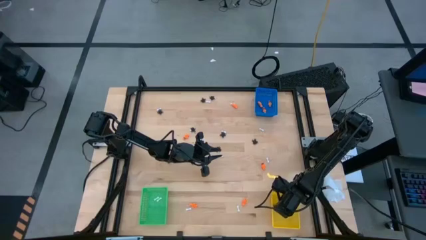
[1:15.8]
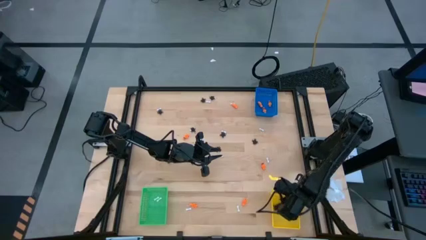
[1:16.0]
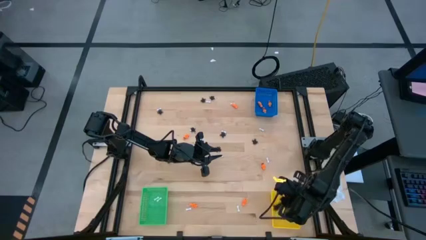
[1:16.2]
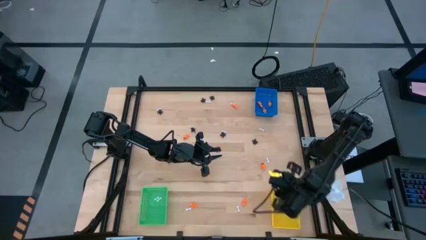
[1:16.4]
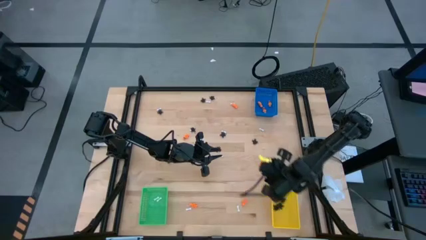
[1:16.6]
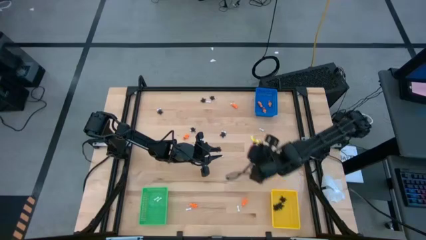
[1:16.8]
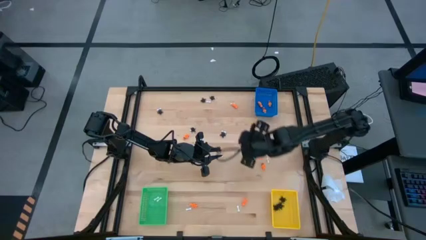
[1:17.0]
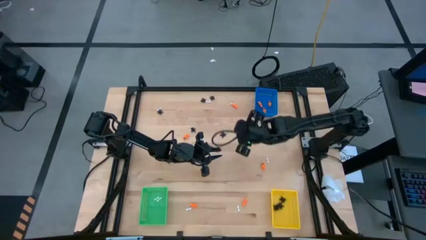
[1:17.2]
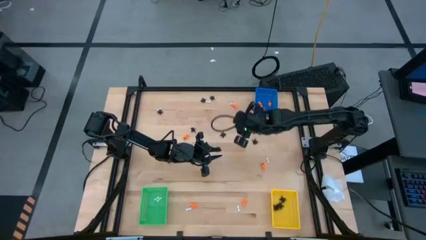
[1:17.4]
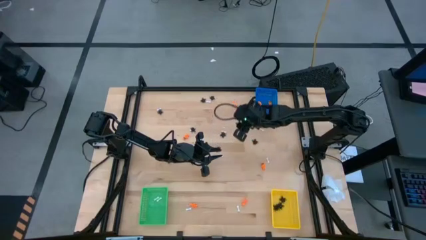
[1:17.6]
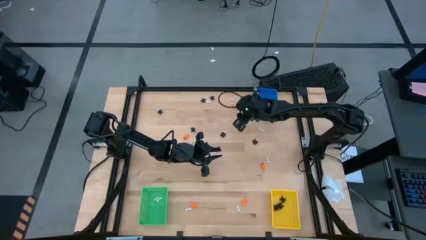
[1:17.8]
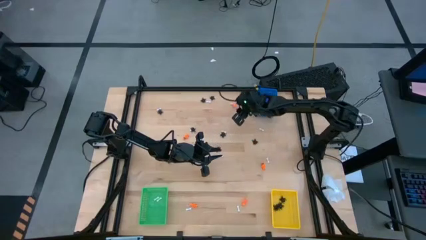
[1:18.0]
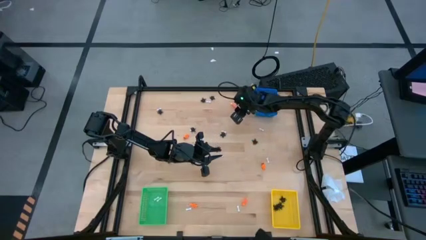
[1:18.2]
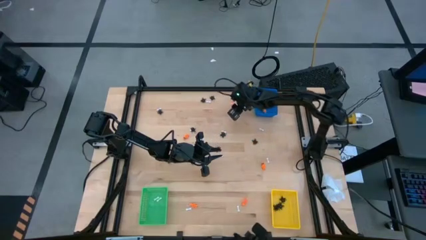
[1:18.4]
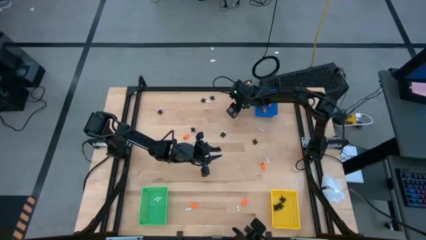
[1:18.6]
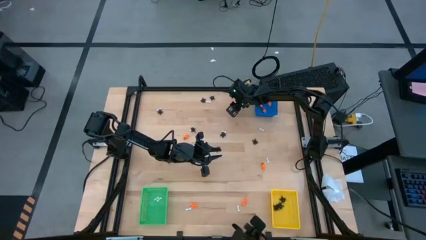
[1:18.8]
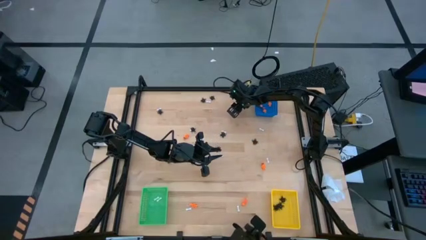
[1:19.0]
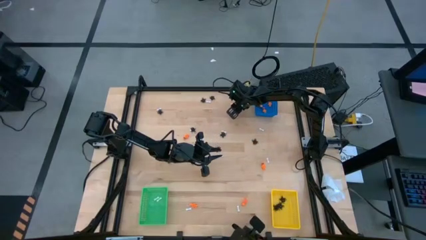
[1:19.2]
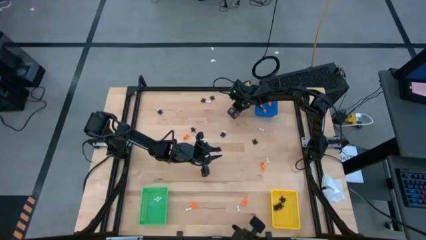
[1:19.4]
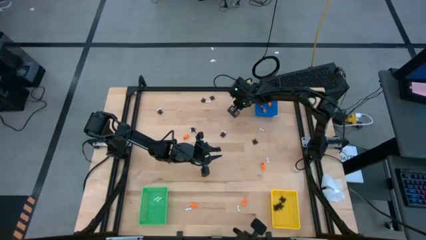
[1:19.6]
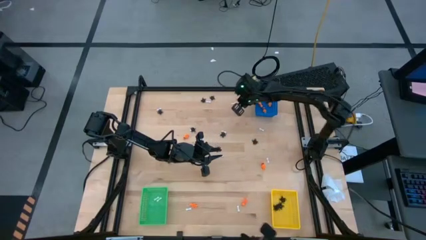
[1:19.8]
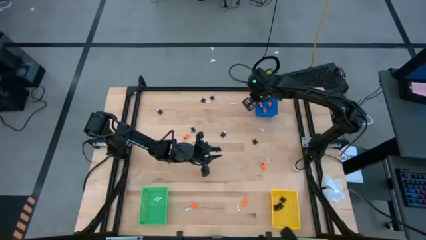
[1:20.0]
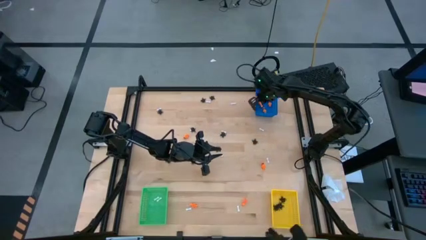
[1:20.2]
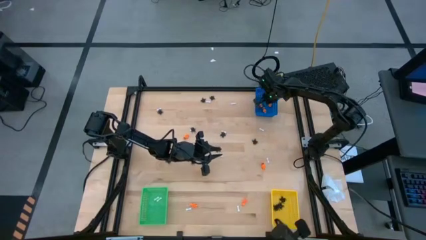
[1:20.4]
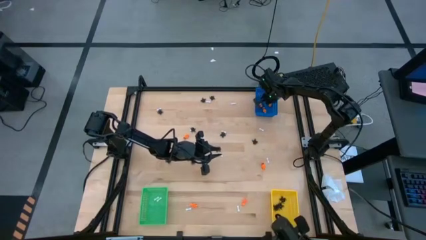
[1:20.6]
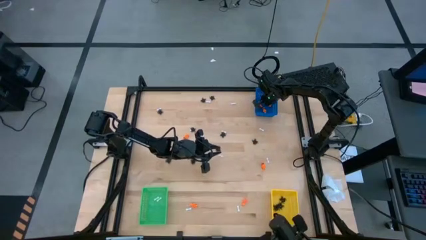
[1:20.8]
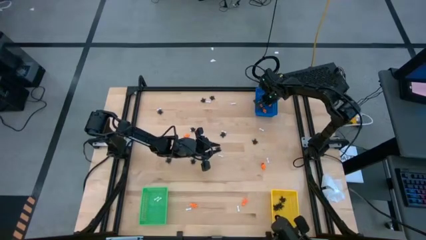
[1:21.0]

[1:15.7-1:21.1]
Task: Sort Halloween decoration
Put the orange toy skeleton into the blue bin

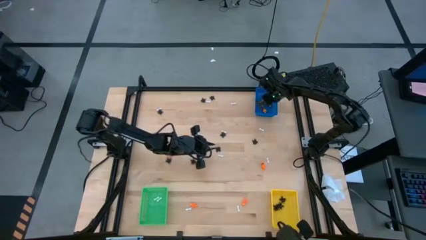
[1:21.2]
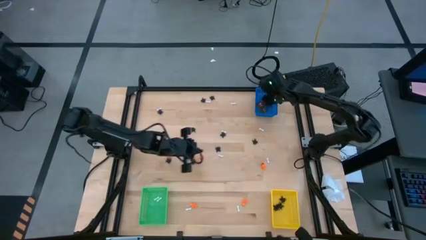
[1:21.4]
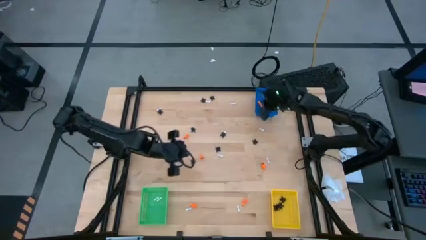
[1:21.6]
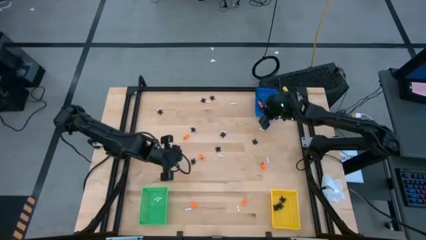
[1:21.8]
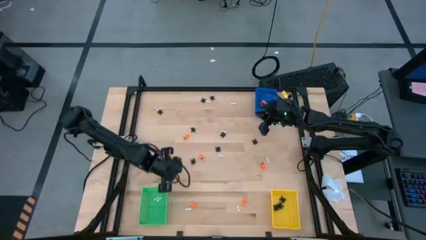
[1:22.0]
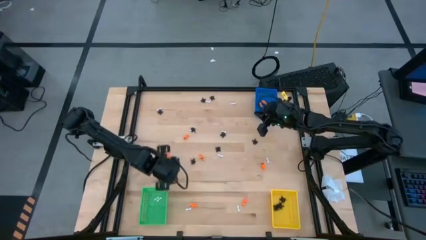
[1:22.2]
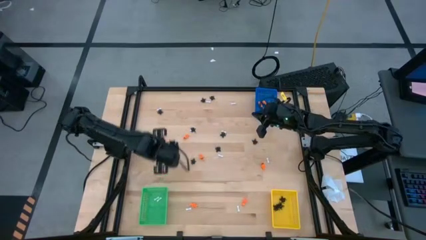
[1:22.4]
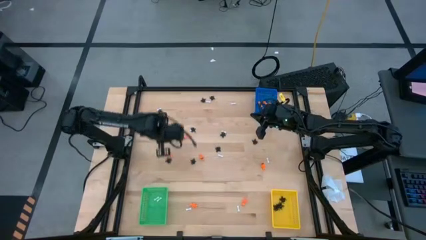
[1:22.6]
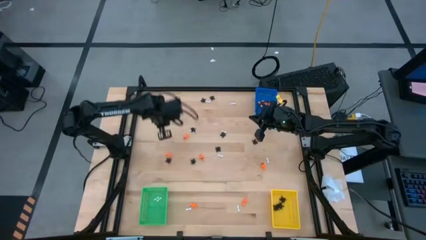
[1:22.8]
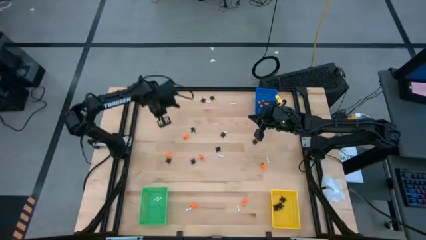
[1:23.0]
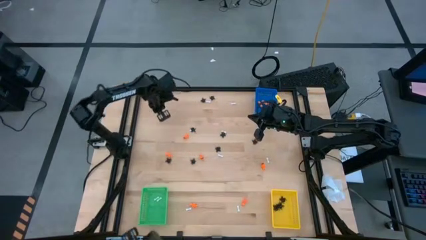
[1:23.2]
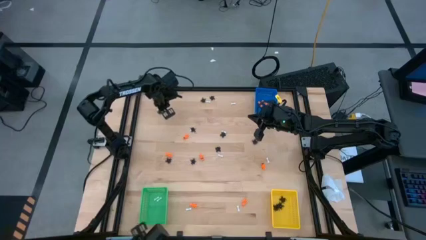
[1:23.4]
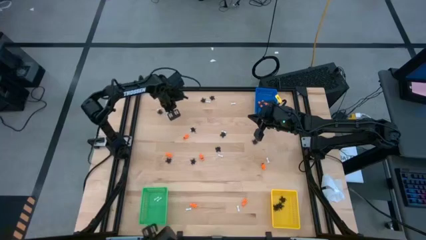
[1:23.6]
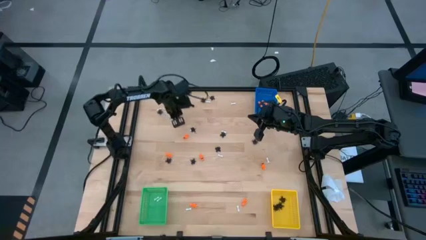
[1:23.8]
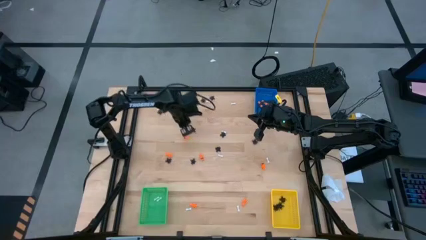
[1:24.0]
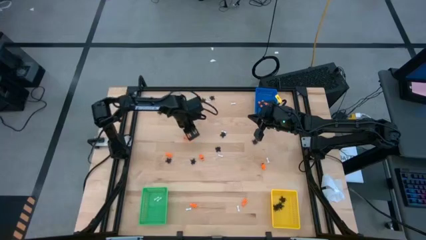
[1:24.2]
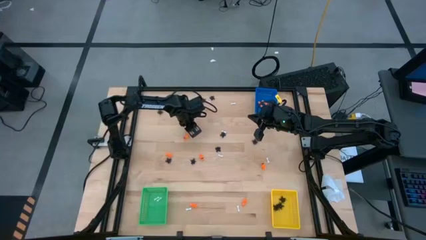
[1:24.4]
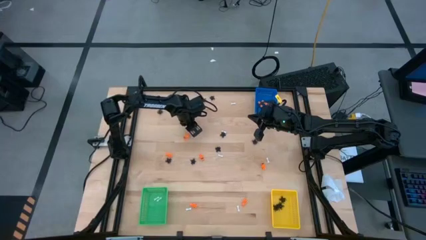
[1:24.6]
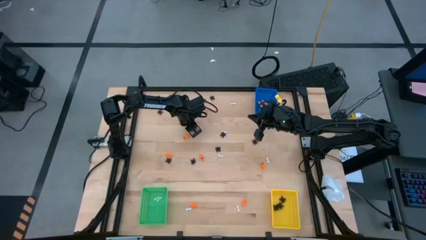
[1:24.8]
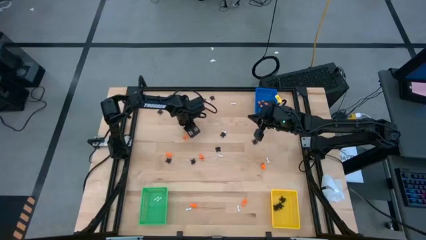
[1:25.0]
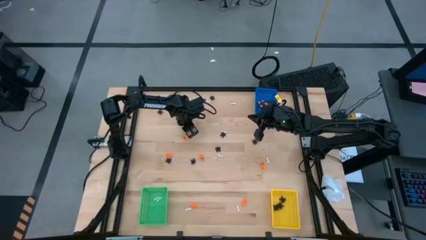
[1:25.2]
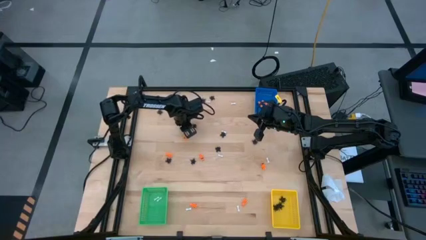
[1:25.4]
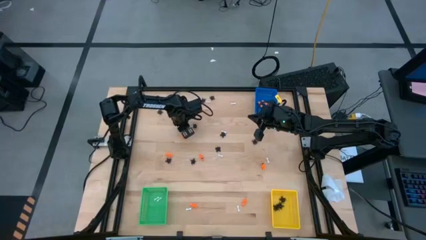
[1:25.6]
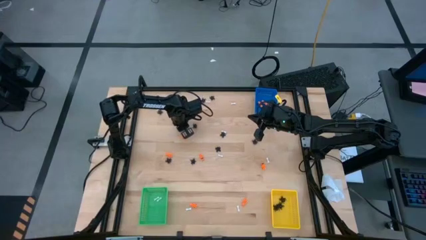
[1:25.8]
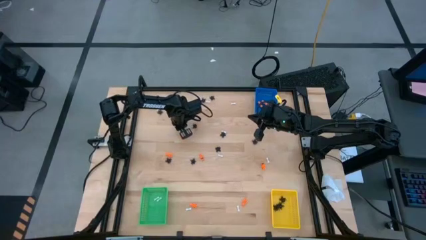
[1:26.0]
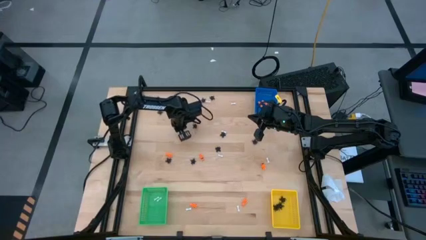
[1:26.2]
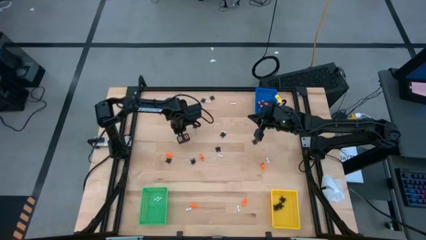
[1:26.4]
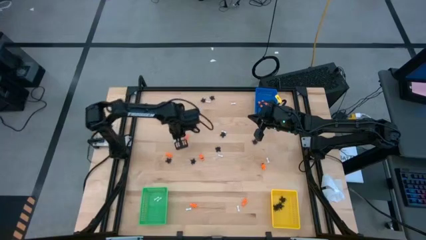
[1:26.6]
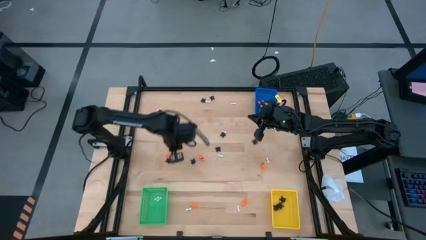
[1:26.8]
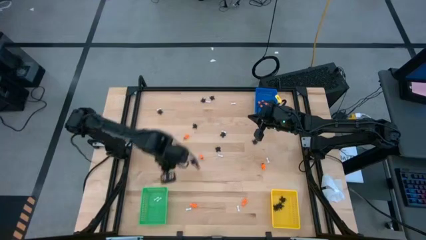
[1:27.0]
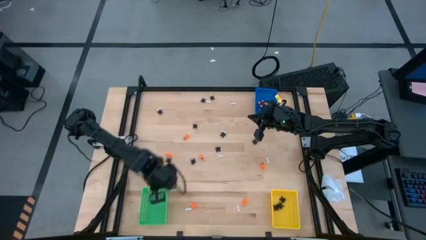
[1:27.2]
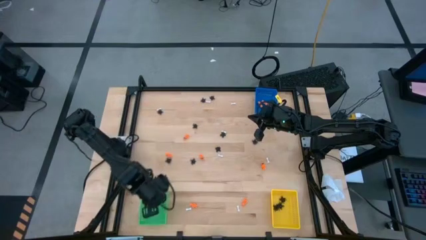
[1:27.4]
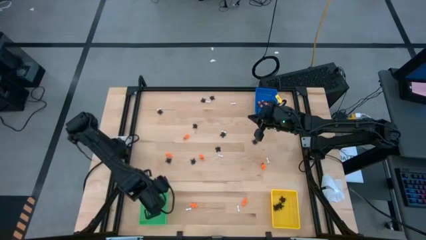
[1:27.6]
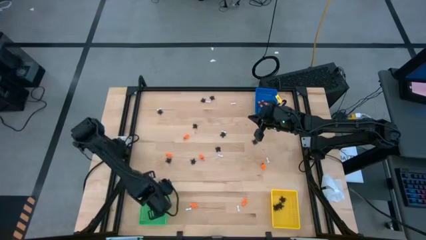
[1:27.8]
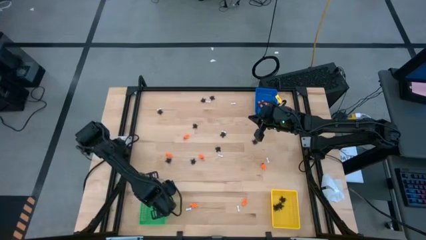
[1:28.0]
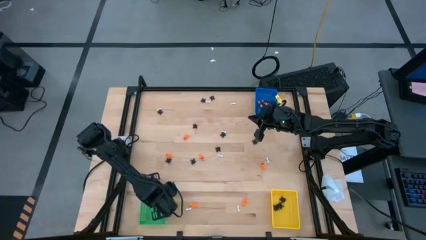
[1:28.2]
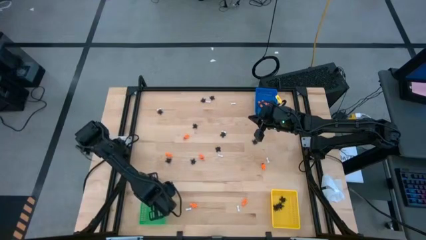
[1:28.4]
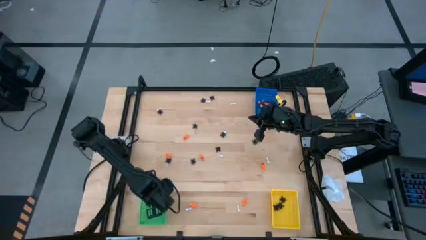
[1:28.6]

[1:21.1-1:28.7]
Put the white bone toy into the green bin

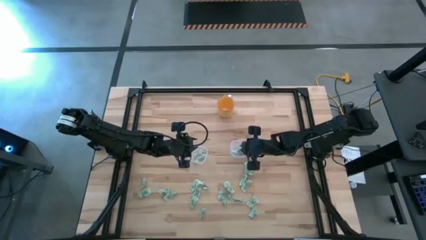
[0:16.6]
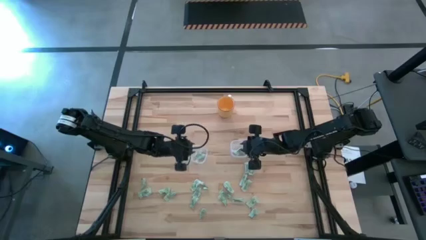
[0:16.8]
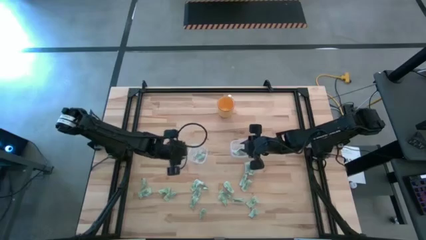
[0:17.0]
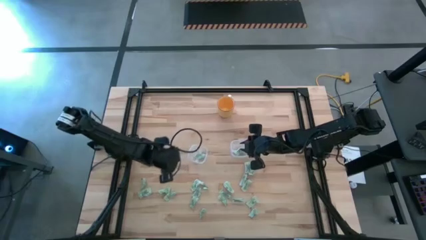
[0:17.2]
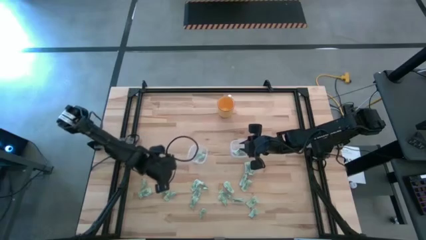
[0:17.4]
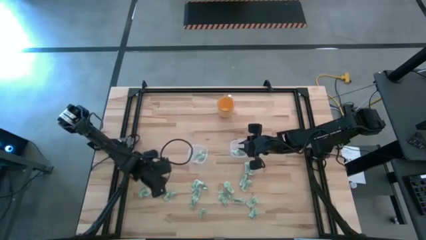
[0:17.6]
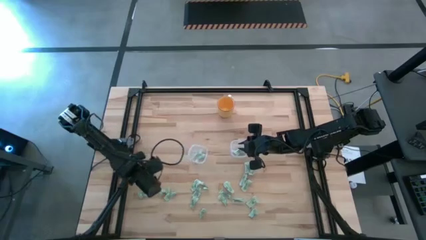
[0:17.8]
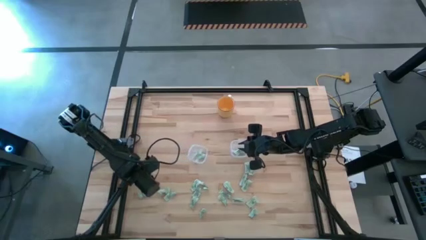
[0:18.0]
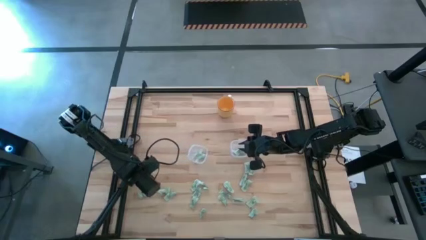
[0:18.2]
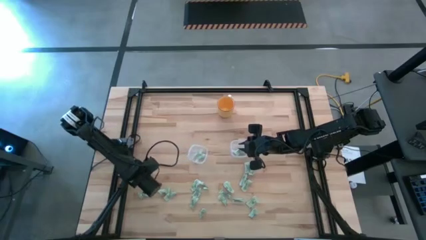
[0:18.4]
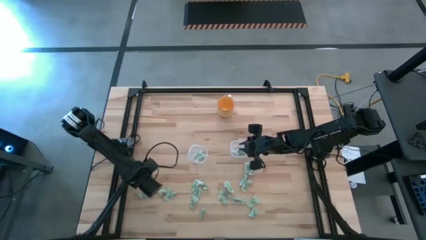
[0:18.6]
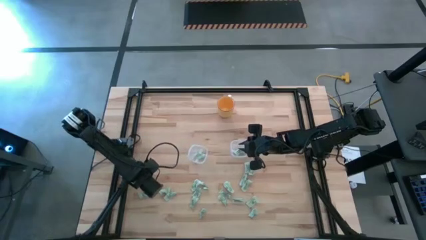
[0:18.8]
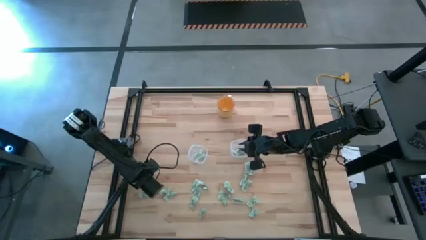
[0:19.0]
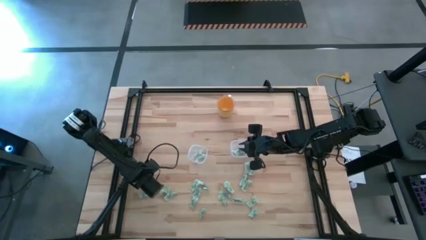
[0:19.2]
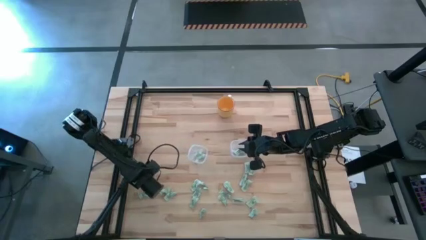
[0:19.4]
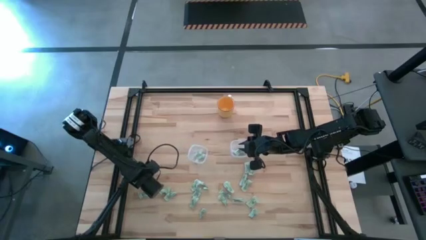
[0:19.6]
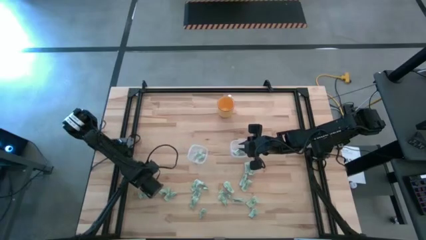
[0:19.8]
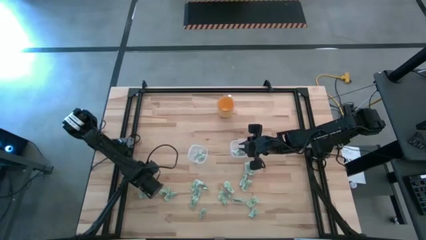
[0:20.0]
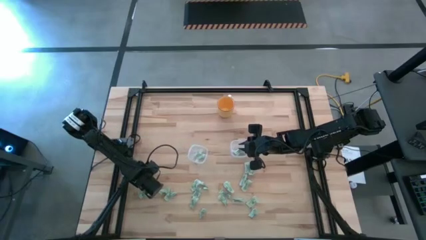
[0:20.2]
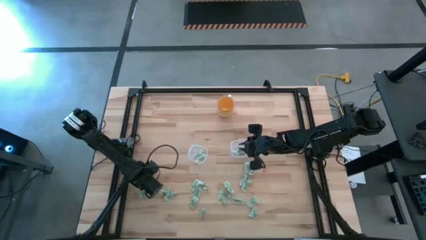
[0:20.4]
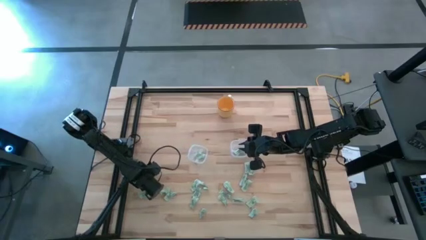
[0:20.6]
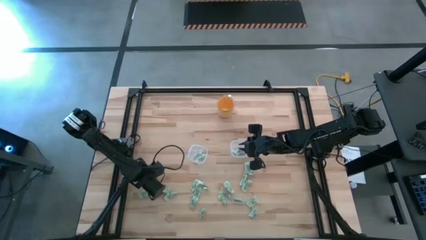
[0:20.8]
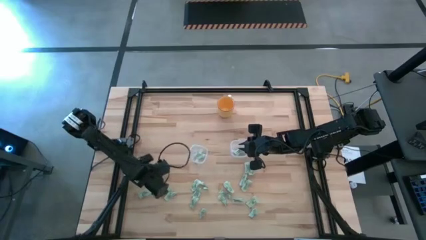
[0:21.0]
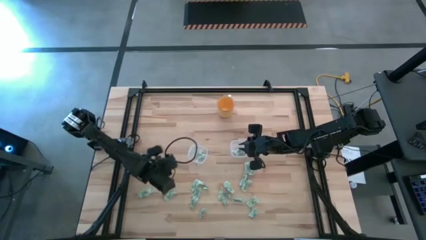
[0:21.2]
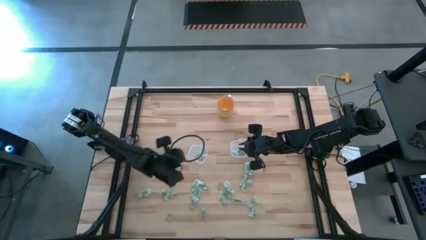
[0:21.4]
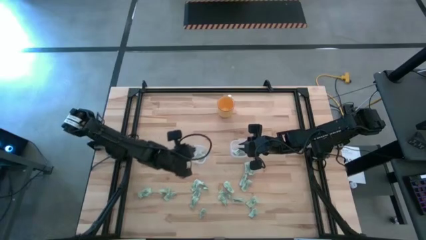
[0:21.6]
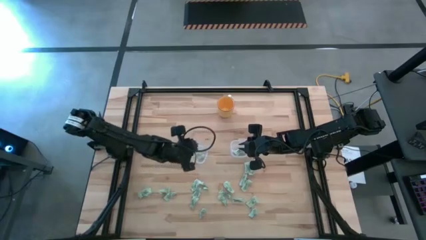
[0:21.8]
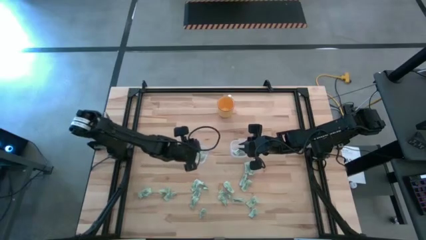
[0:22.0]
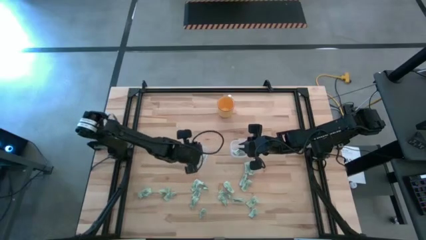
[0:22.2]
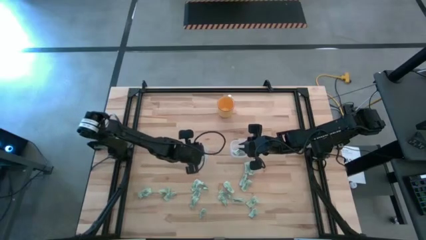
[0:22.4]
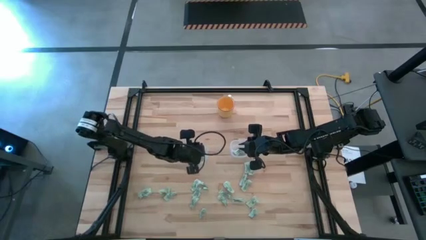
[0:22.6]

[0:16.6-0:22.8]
Task: Pick and place items into bin
Put the green sweetener bag into the left transparent food container
